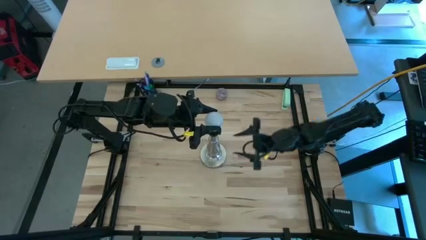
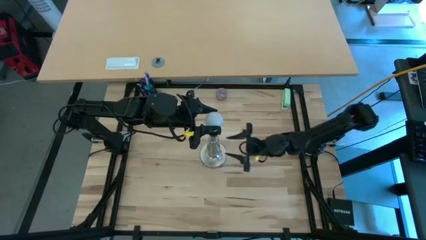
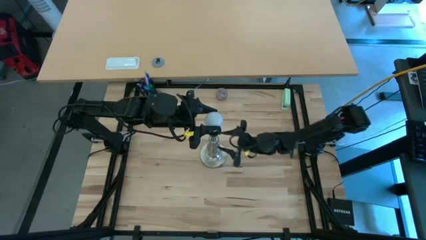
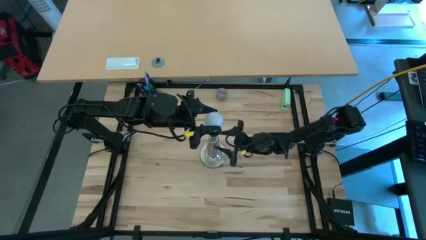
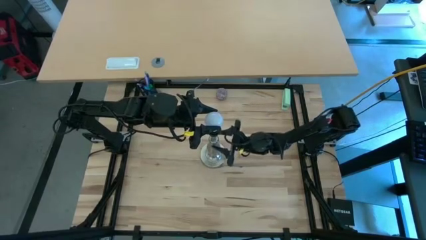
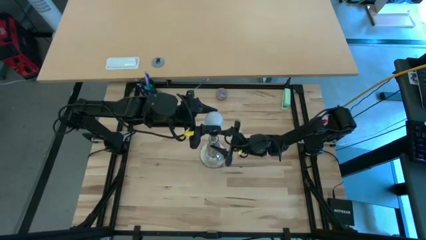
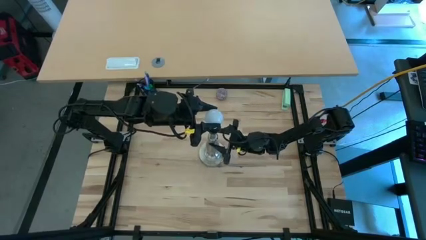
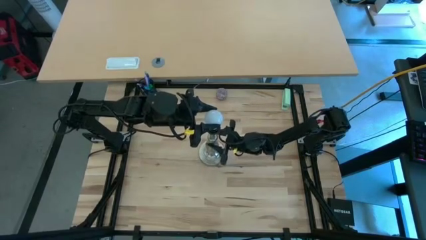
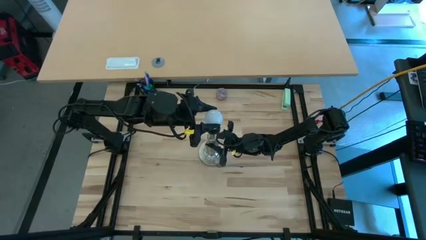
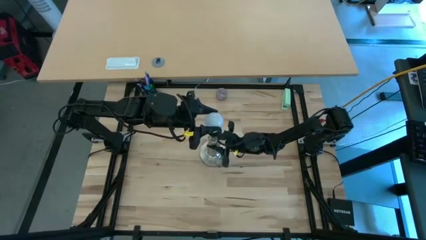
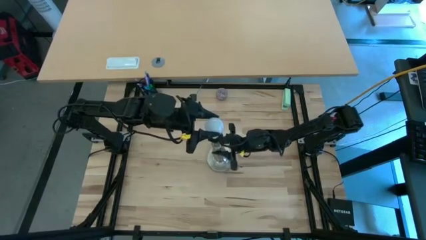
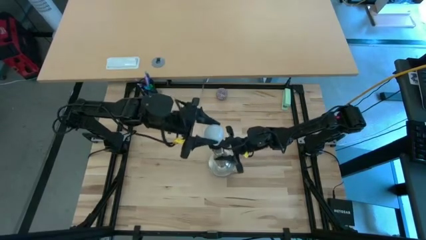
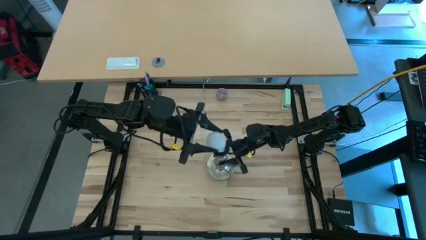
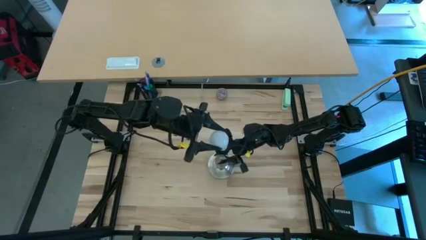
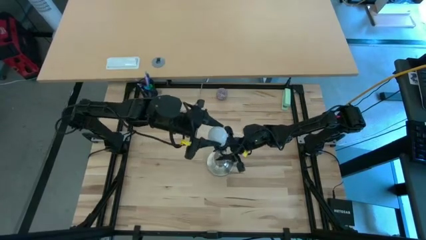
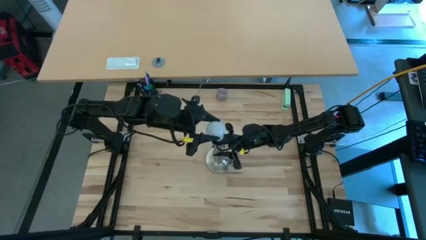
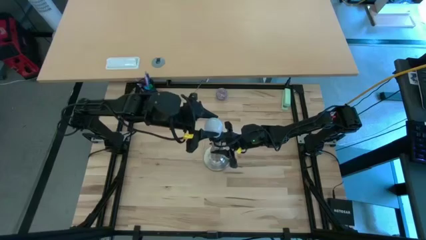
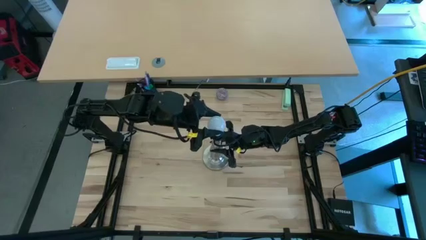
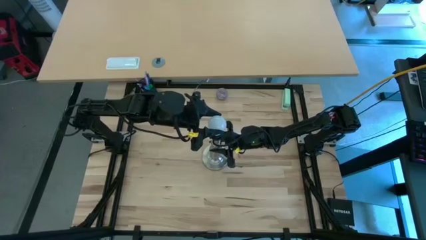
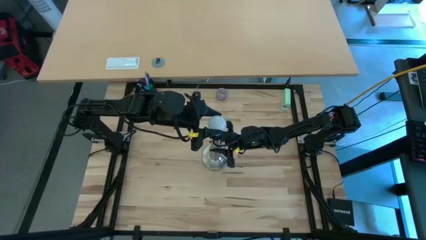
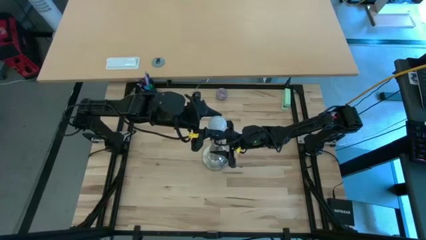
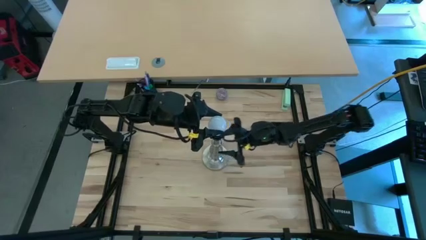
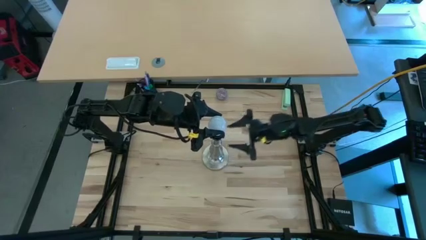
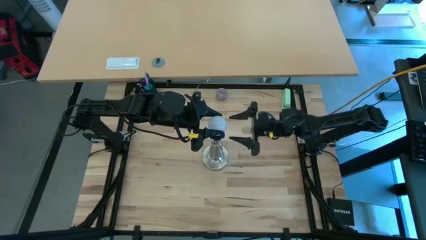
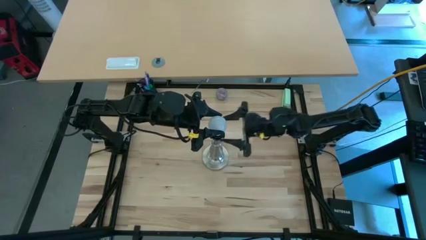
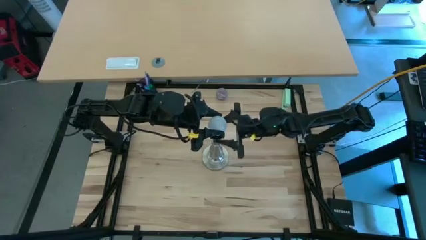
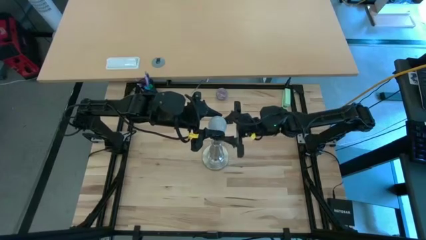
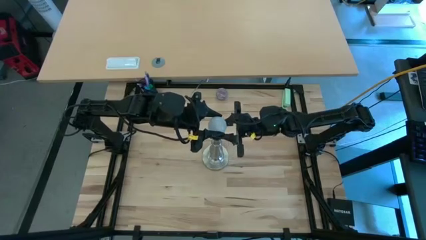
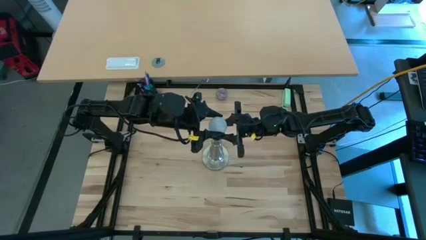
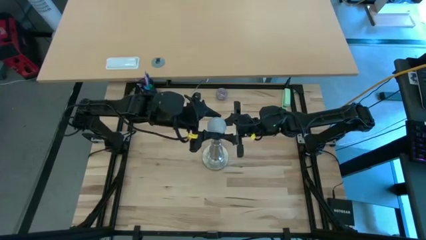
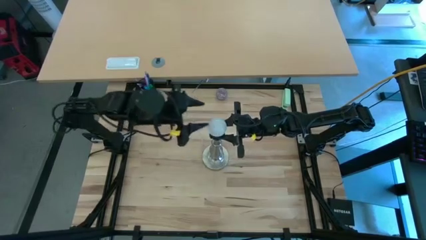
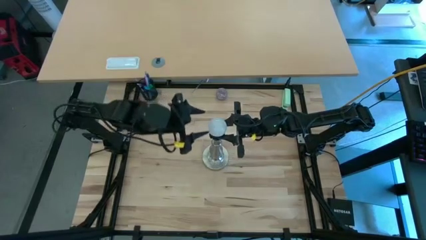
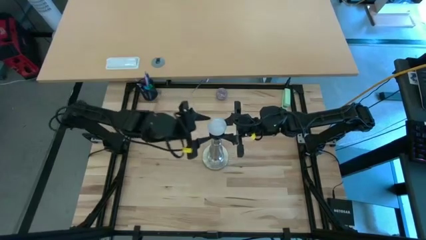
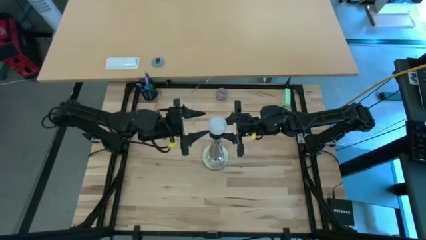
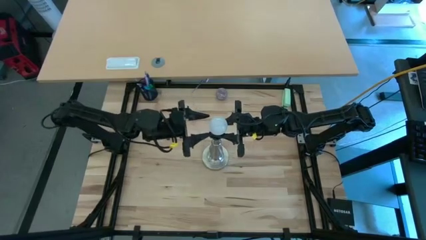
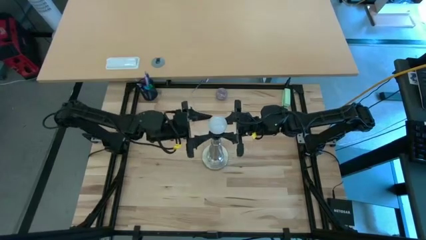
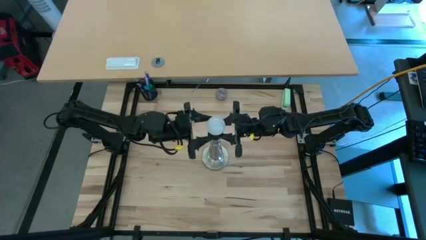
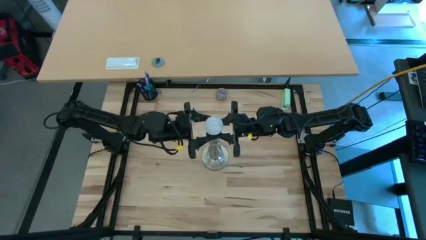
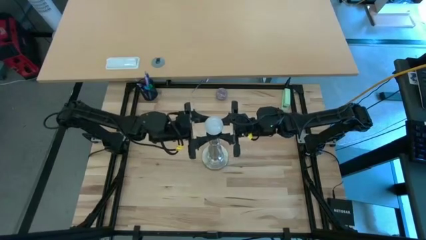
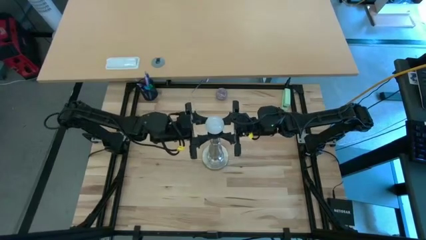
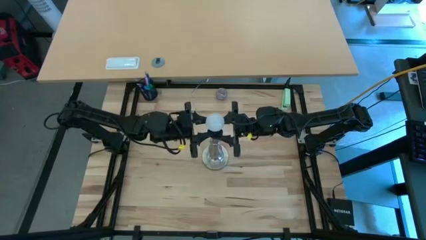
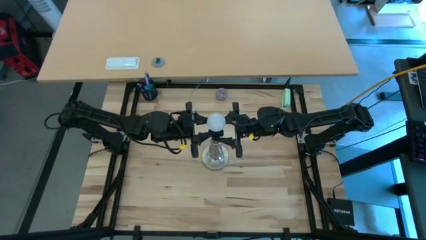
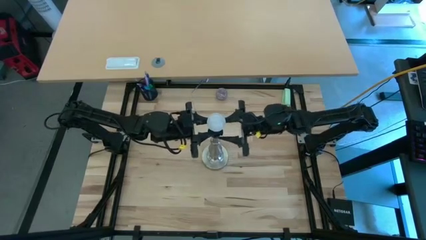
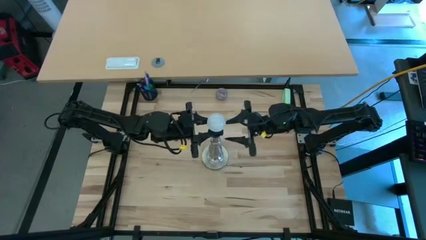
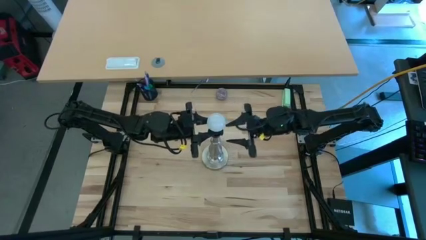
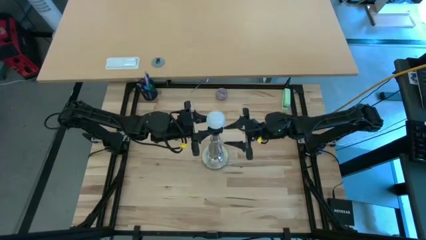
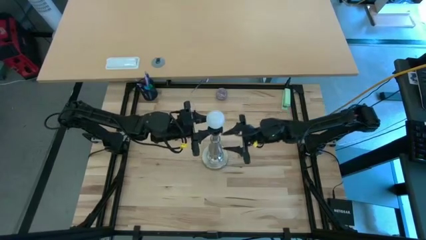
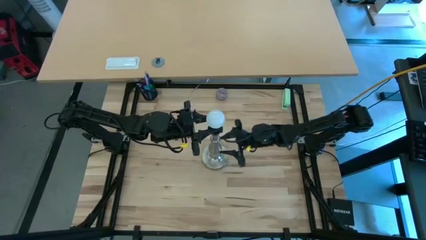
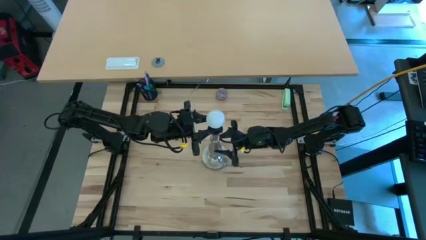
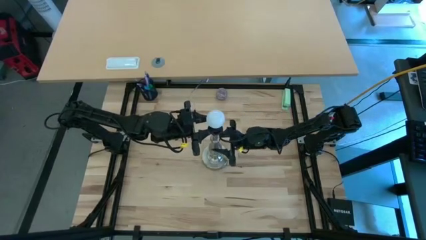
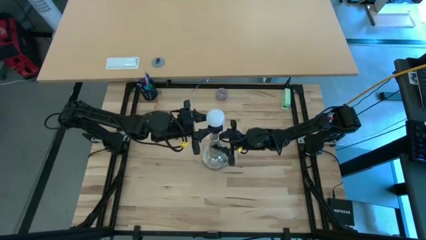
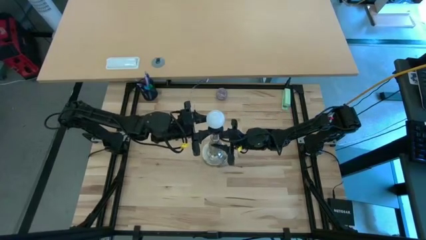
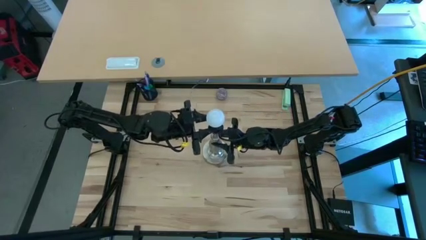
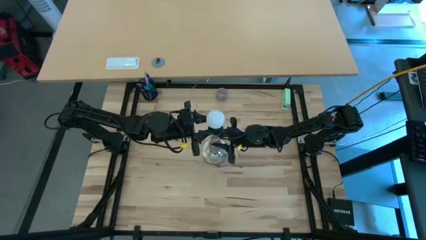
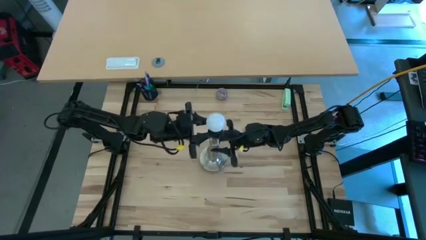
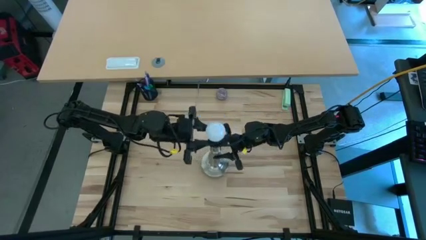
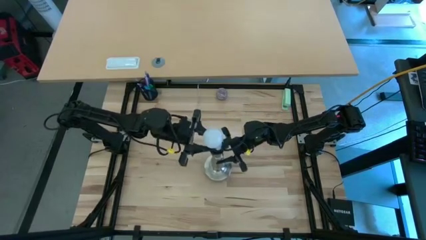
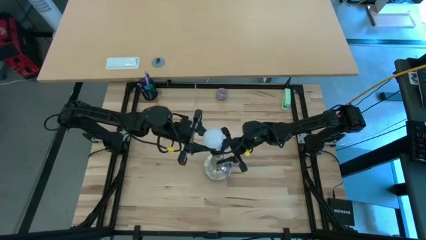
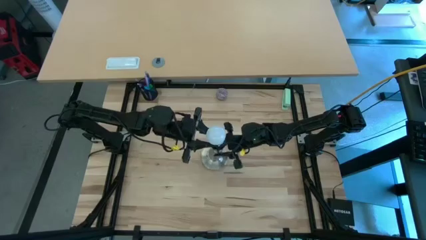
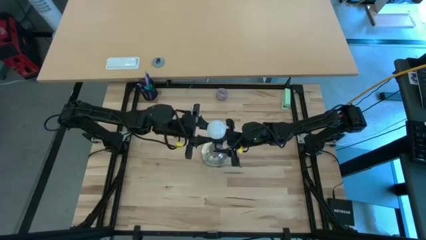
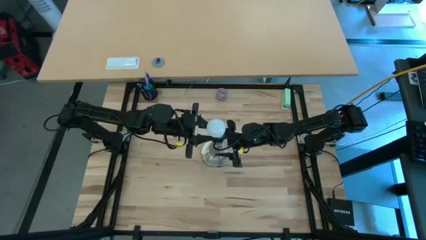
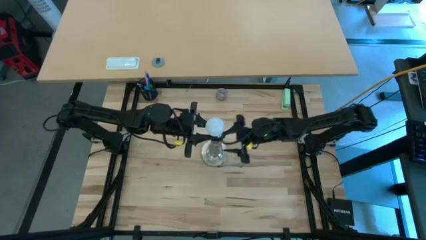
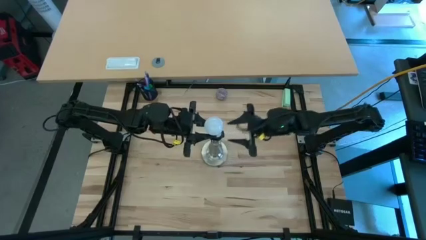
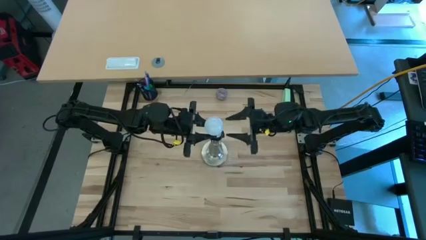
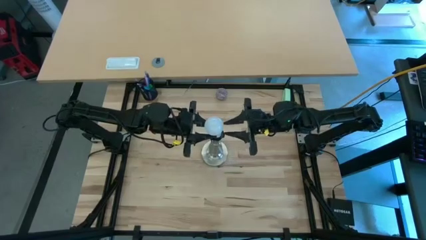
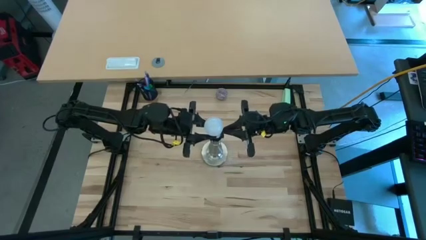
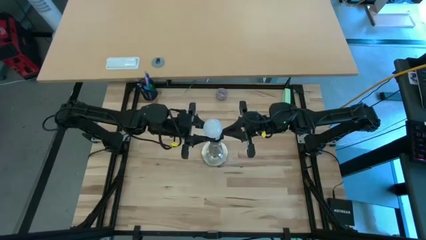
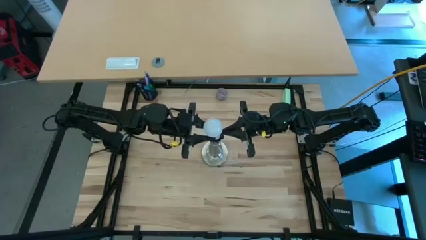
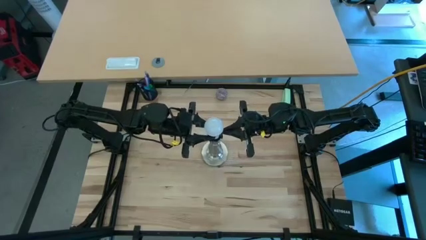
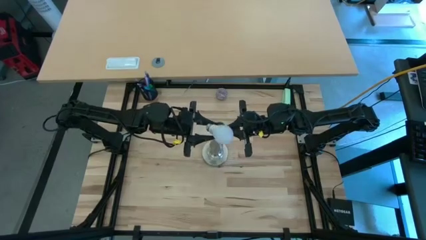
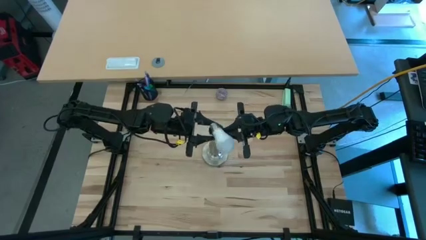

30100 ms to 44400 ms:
Task: Screw lightbulb
Insert the lightbulb into the silver lamp
